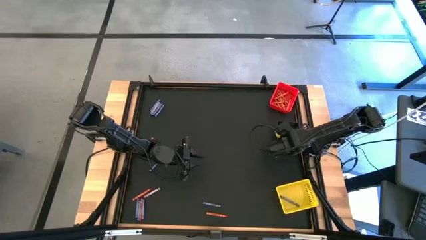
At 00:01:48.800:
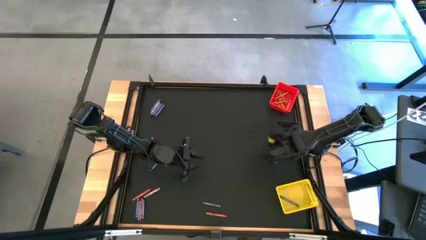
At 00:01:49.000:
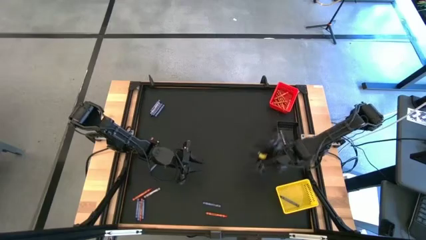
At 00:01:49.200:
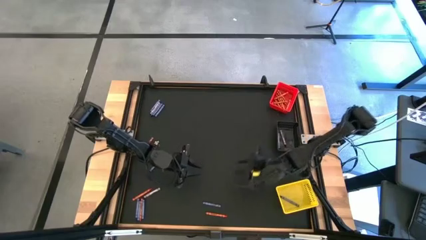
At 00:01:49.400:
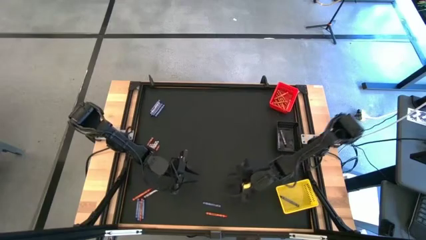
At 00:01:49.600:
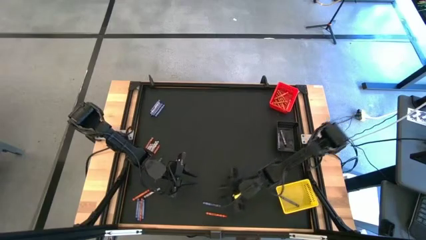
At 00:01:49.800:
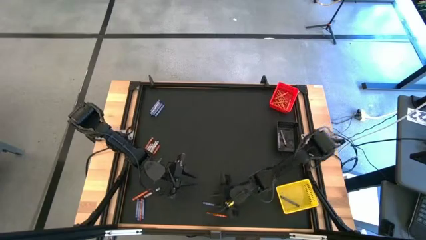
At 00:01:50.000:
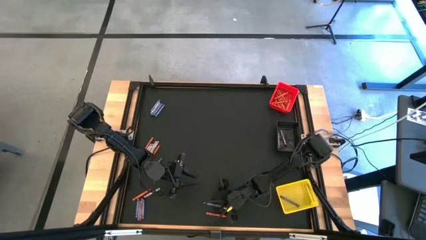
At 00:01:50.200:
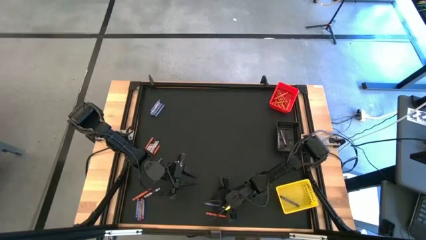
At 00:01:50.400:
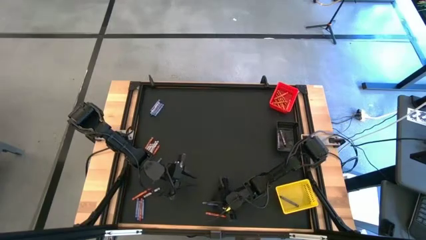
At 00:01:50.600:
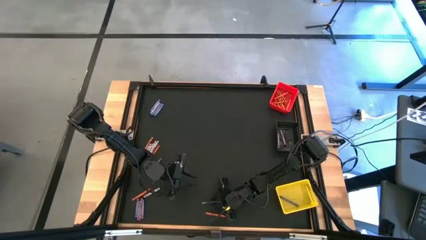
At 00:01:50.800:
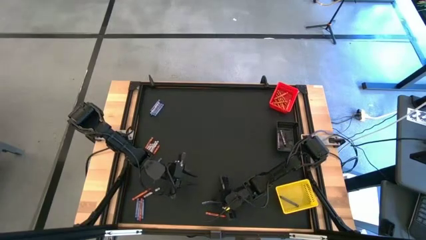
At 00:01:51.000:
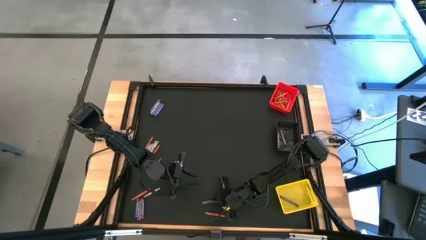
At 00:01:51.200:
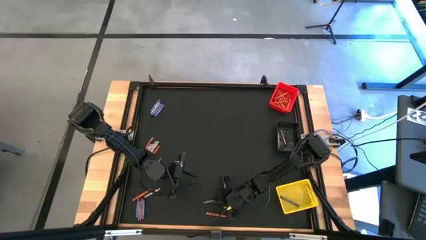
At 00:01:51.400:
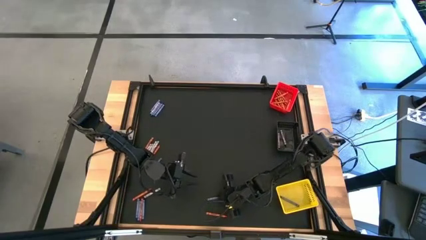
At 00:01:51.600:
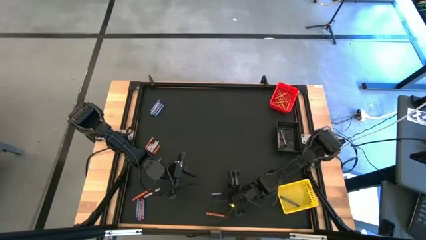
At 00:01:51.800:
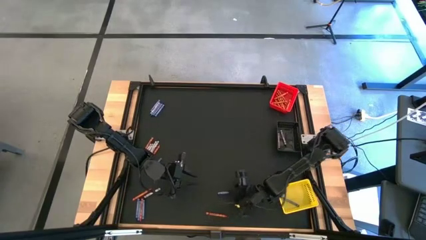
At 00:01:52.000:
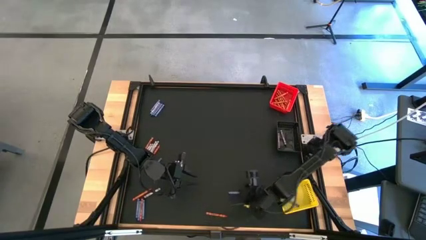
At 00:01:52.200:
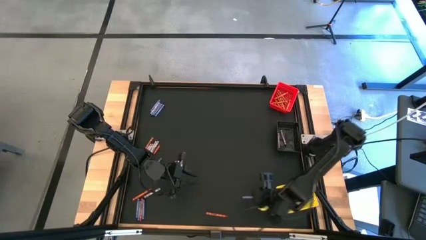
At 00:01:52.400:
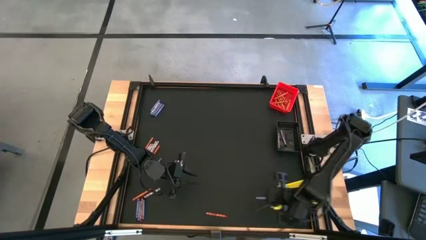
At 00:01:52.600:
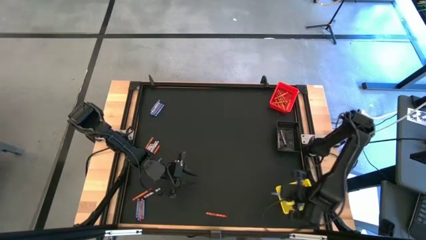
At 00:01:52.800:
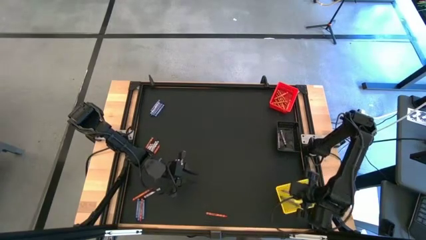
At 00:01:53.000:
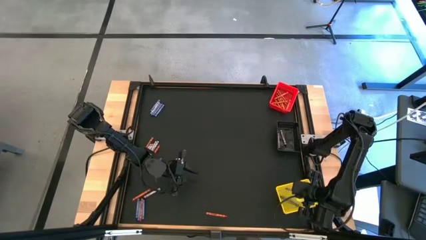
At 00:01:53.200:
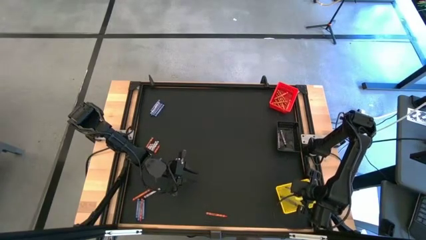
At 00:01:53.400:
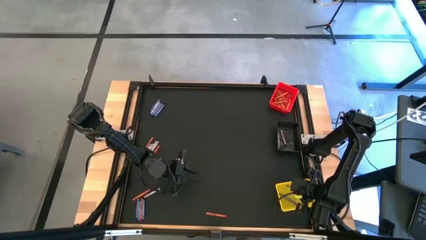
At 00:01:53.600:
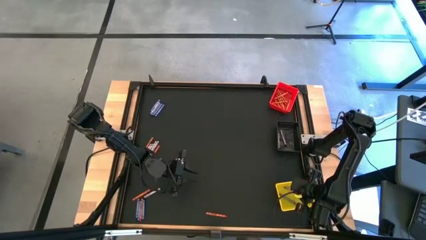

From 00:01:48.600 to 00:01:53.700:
Task: Sort crayons
Put the blue crayon into the yellow bin

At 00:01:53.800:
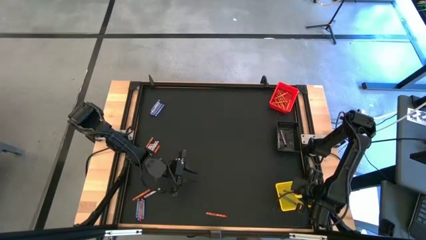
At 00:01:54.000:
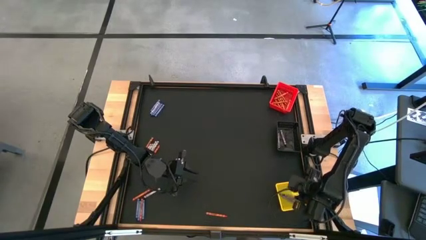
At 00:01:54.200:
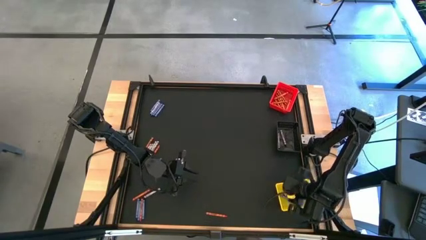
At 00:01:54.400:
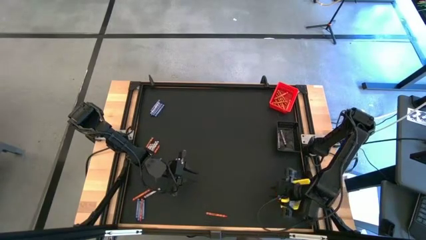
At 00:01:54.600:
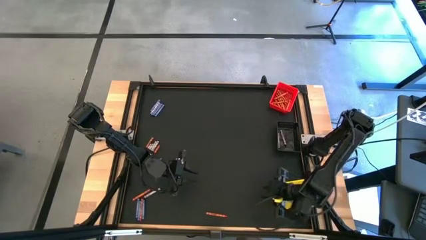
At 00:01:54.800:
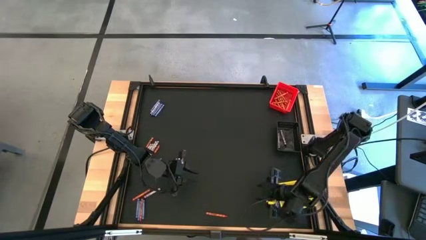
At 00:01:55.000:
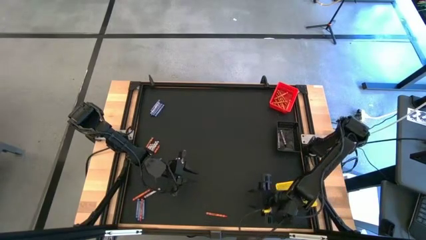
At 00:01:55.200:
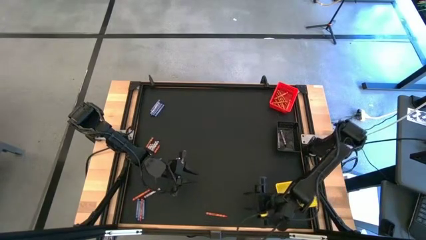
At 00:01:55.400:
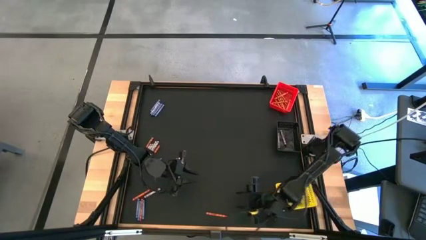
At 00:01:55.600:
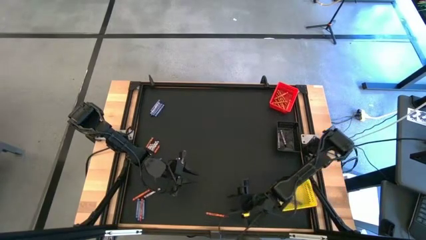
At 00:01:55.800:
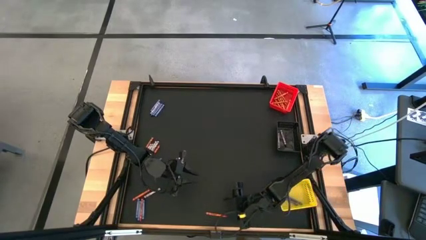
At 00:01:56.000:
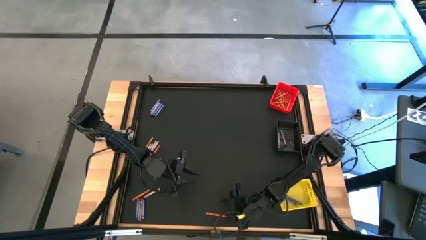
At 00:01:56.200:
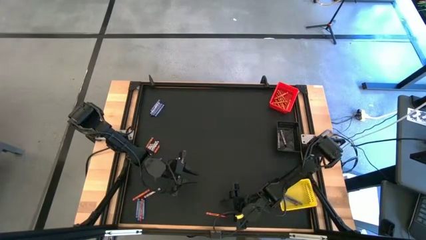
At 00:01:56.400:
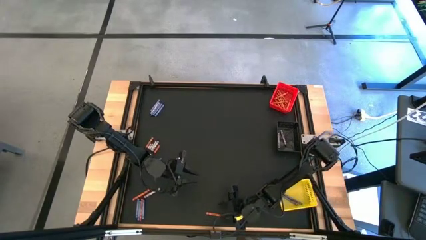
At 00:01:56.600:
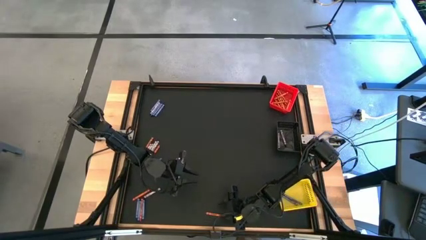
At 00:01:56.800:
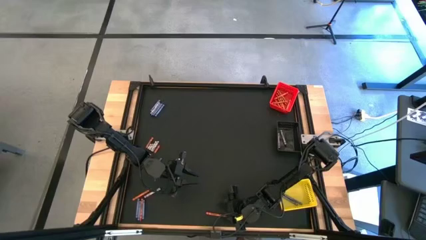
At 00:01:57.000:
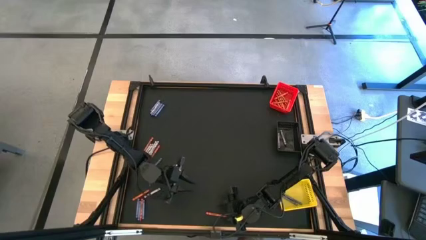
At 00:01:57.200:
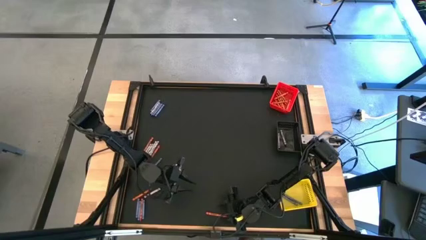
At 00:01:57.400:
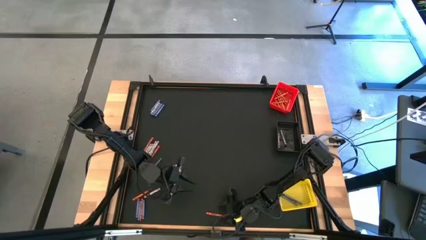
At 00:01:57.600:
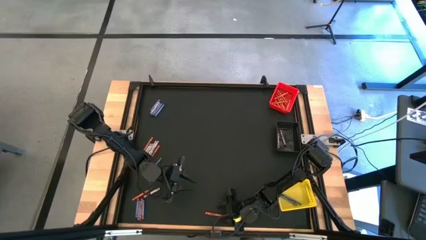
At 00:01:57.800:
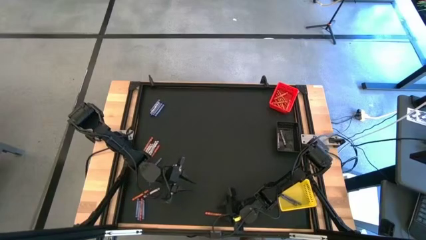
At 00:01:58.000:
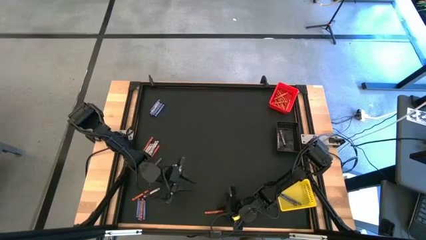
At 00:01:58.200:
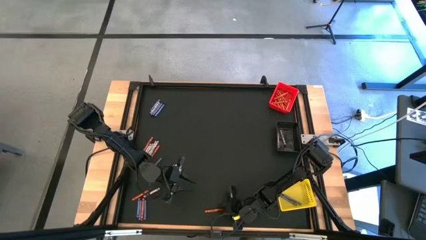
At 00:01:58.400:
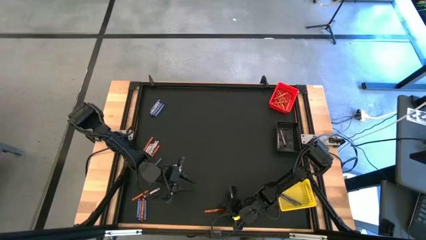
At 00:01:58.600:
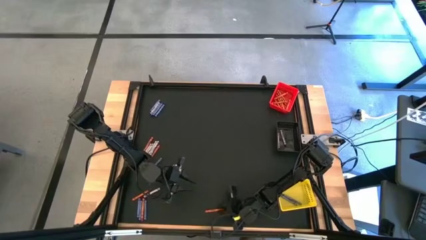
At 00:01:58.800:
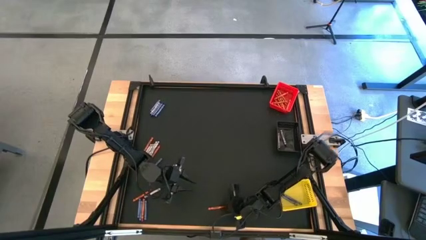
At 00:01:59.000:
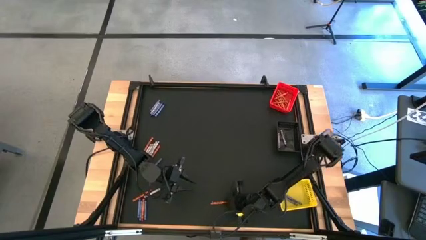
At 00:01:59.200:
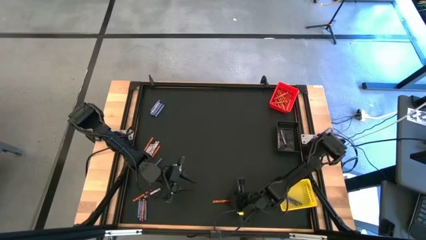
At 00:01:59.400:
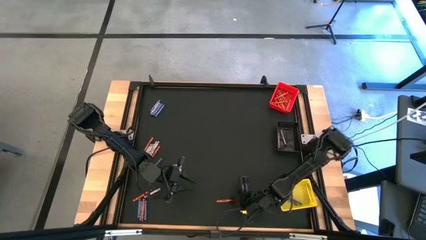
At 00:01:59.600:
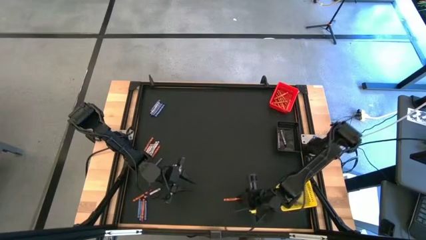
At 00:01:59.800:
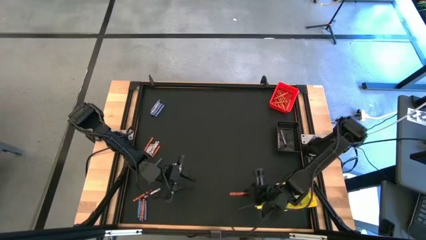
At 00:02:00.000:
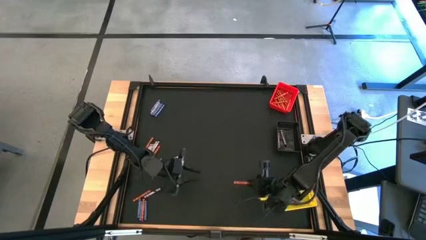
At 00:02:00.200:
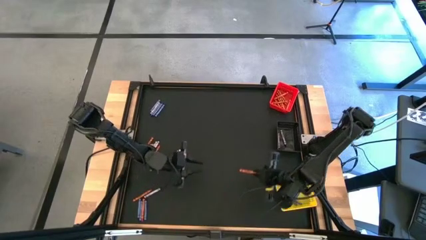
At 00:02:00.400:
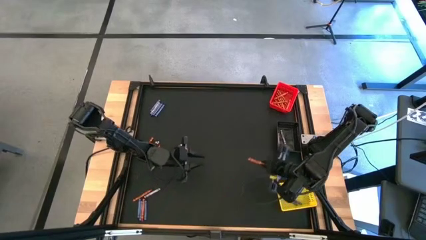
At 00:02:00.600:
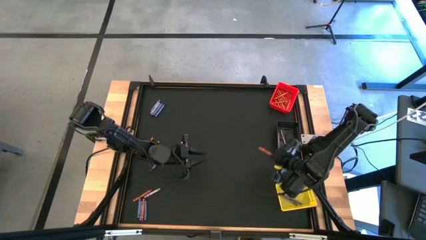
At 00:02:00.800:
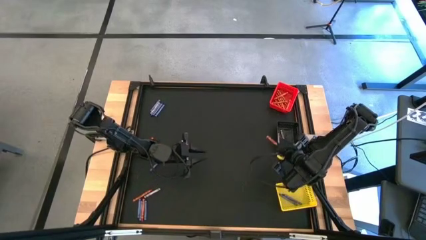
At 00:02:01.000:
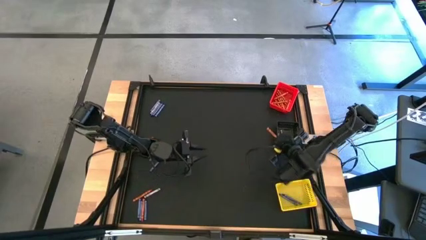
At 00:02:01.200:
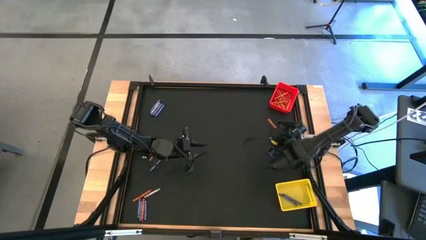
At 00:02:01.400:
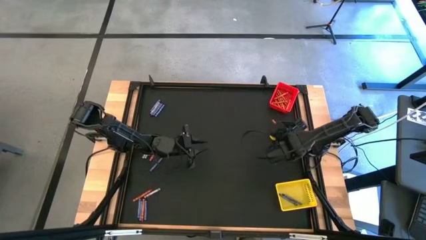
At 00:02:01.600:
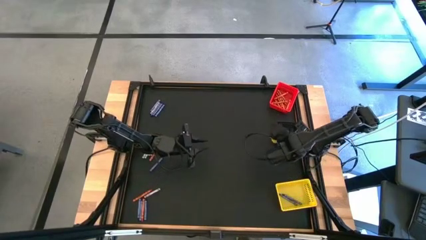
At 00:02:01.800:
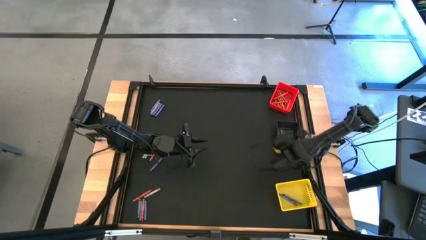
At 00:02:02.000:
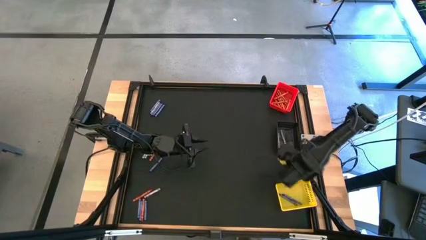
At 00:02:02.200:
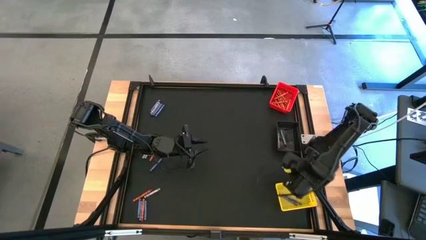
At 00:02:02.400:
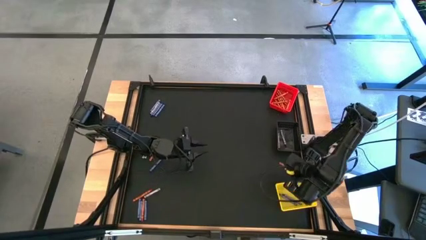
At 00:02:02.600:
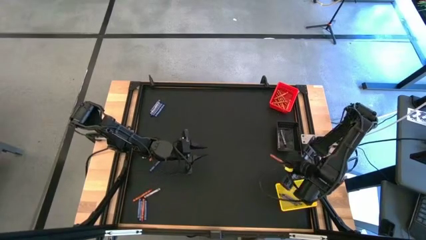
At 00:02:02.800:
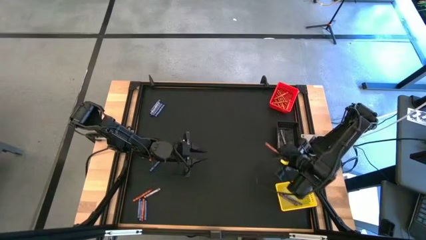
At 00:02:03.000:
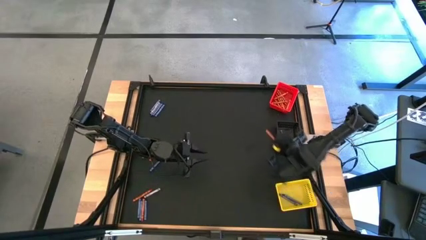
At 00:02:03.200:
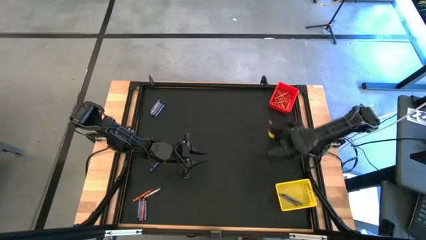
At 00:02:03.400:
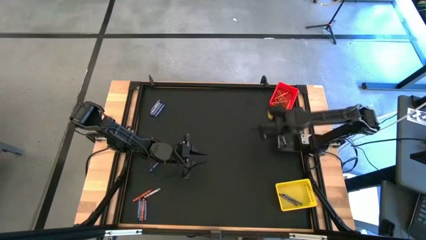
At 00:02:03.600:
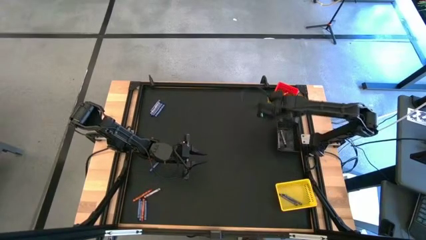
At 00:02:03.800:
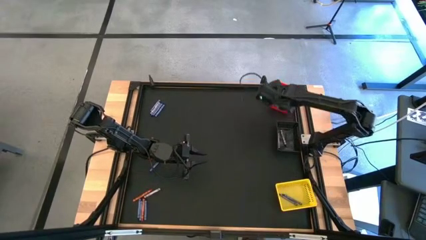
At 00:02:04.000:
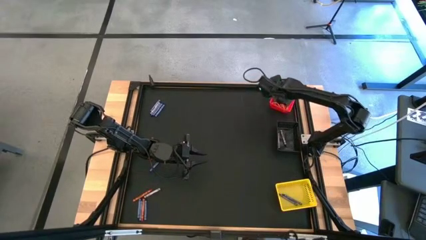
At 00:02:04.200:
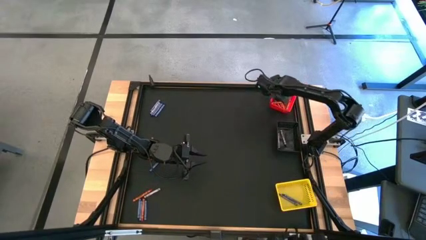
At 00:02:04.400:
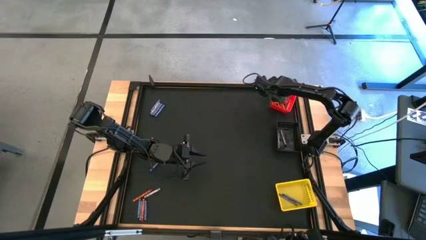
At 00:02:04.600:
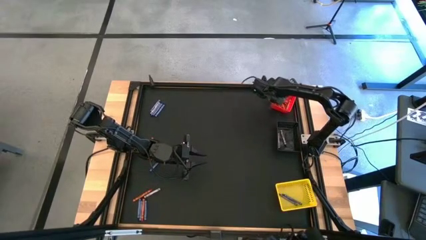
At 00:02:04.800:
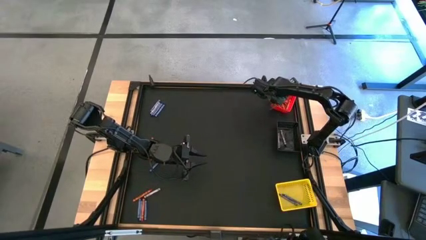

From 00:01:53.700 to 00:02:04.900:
Put the orange crayon into the red bin
